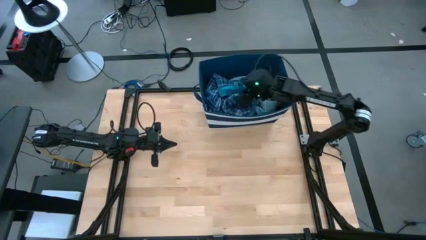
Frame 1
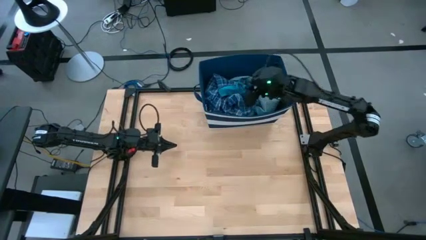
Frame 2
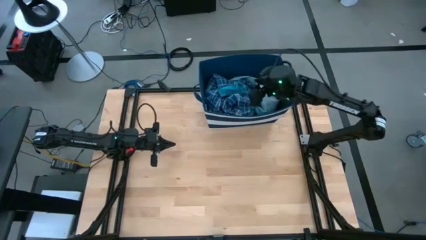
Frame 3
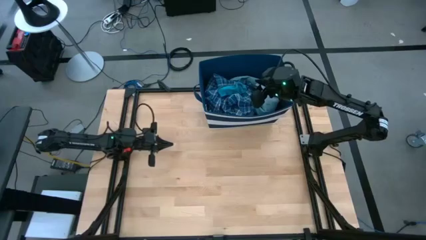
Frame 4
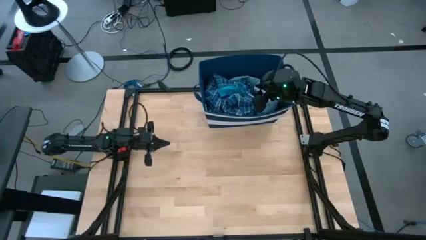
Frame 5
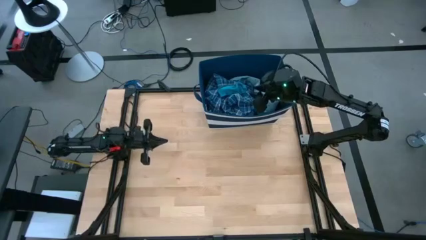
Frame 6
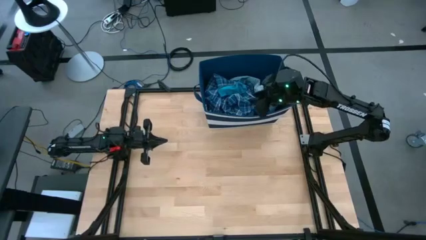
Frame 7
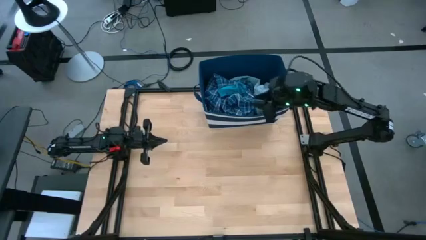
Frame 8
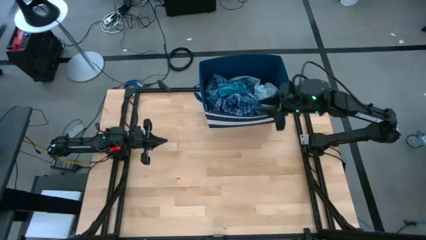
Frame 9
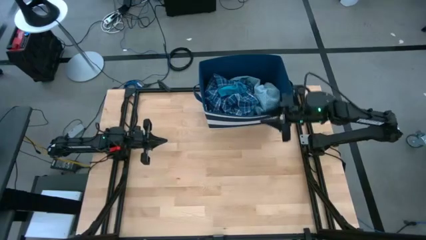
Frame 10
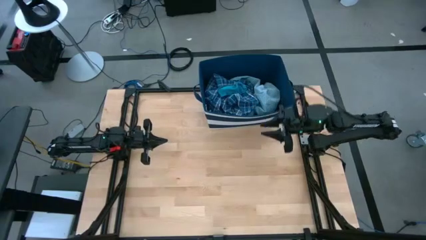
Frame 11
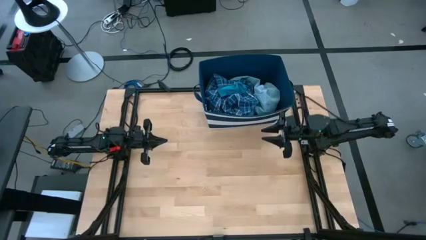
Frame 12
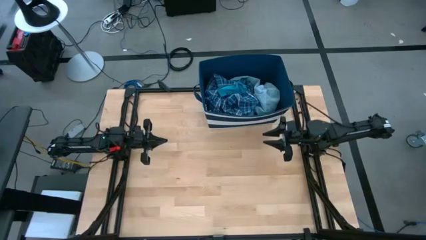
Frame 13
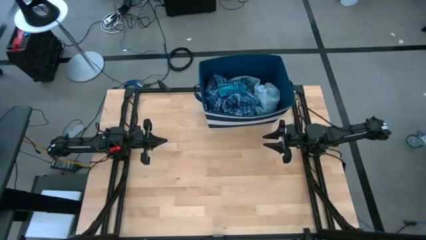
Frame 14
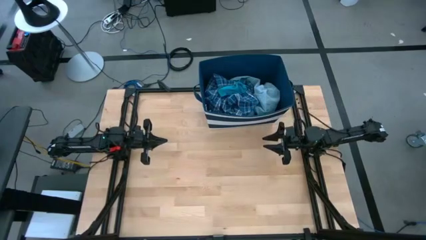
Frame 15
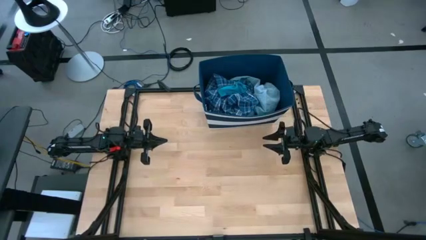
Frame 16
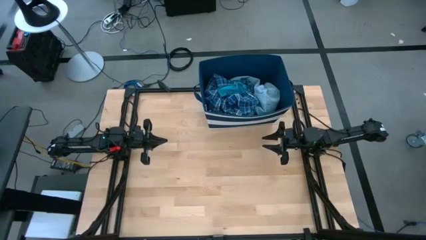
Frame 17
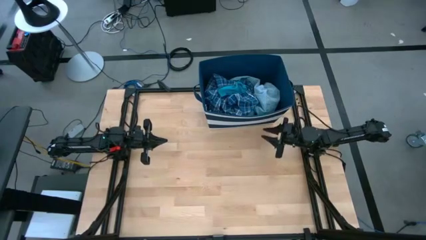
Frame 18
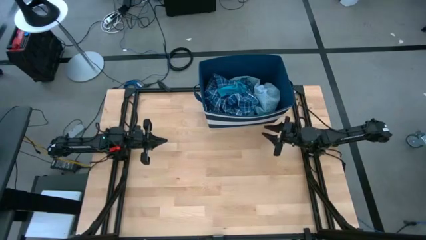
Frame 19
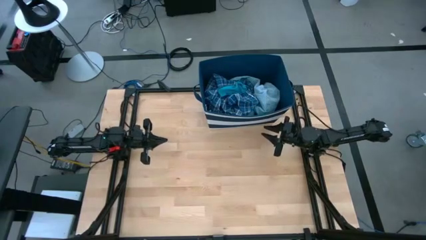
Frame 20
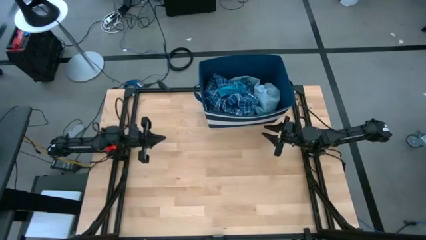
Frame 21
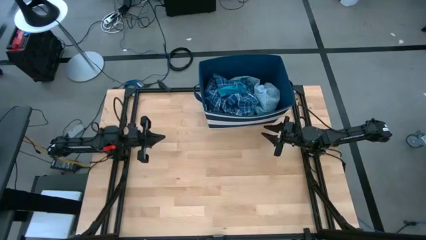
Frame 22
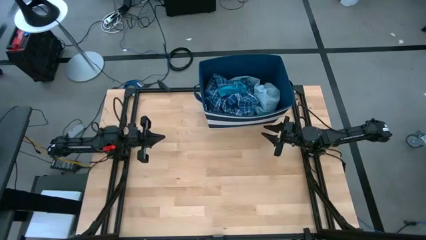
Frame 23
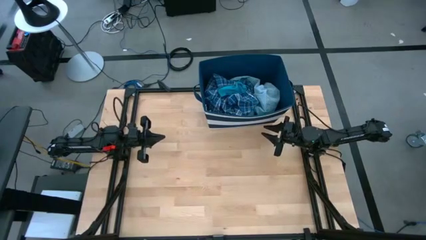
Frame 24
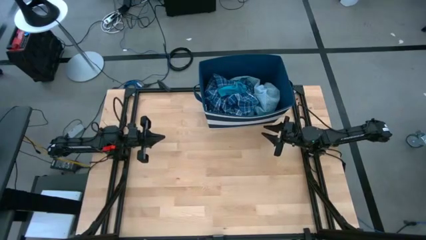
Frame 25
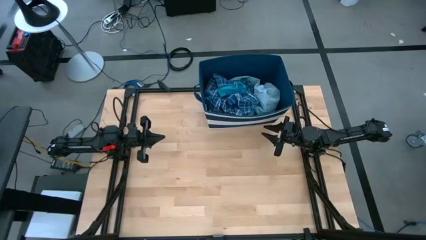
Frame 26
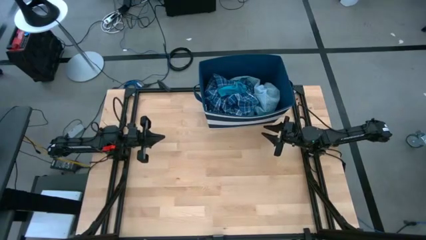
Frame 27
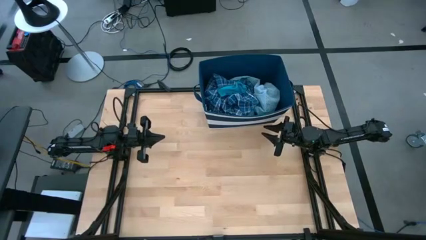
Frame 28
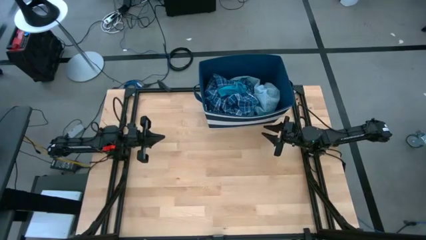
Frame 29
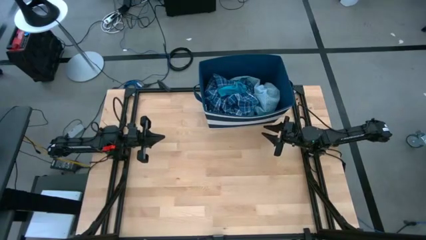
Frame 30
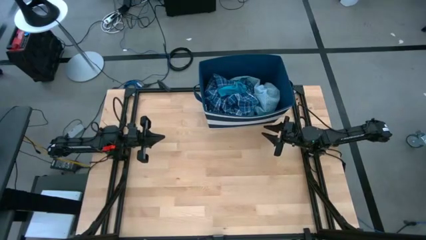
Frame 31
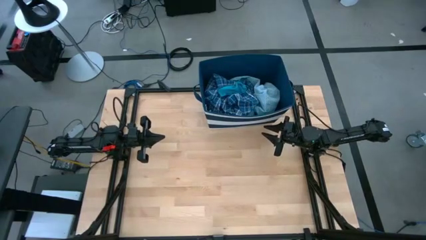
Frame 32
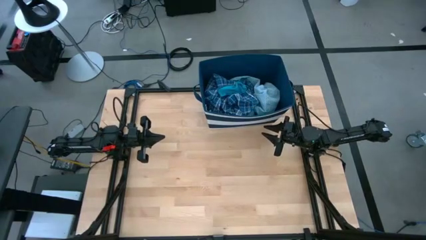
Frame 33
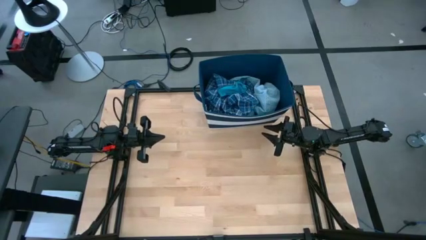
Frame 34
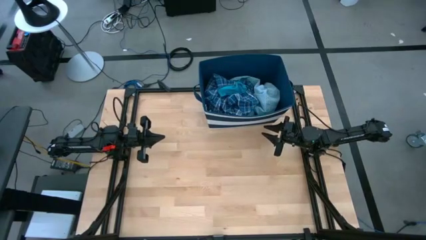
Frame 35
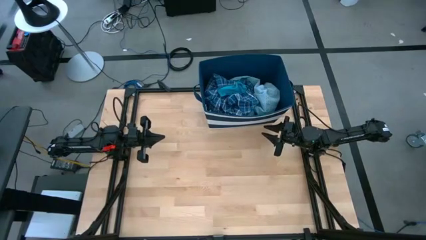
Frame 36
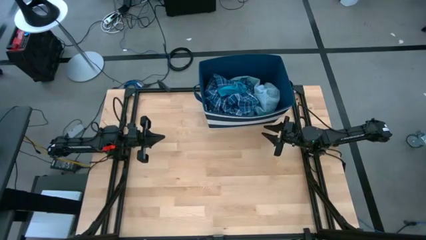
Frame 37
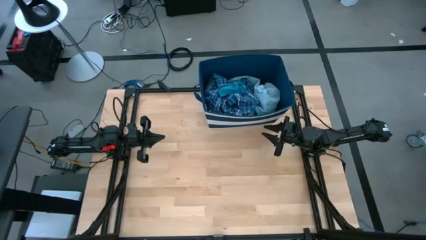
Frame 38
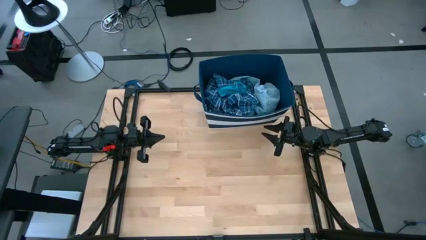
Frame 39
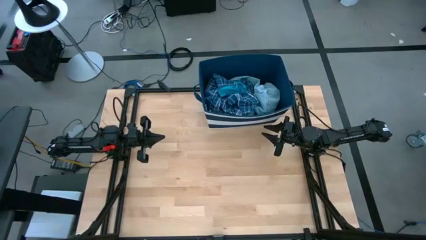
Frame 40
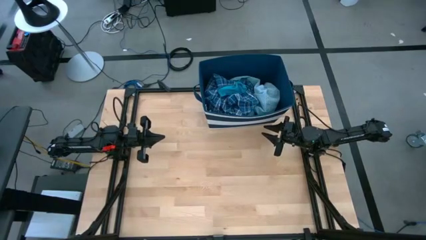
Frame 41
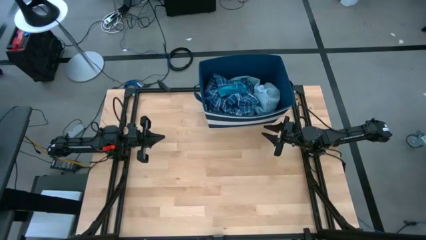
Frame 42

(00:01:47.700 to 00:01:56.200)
Task: Sort clothes
Return to Home Position
